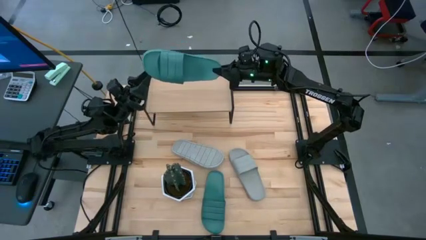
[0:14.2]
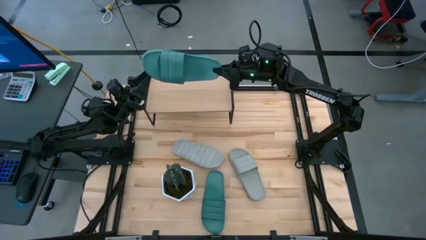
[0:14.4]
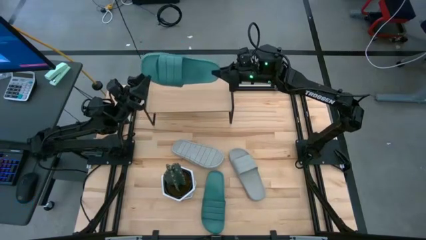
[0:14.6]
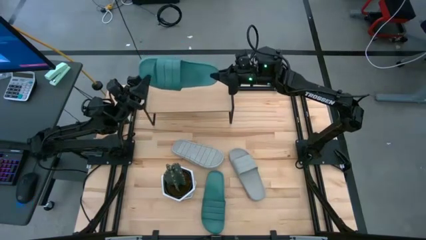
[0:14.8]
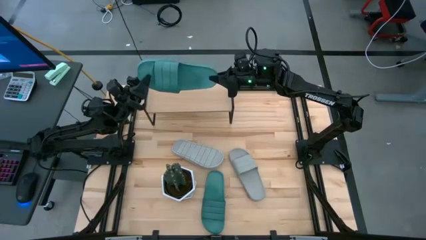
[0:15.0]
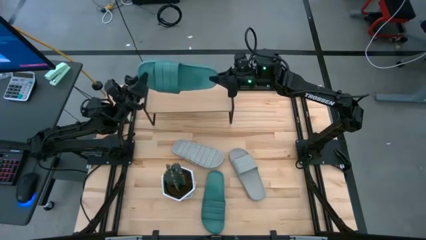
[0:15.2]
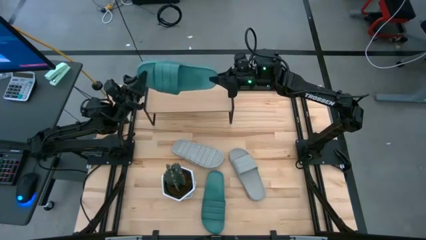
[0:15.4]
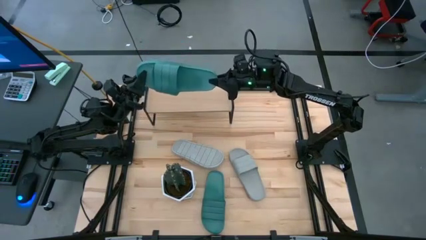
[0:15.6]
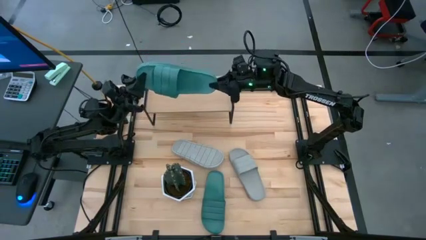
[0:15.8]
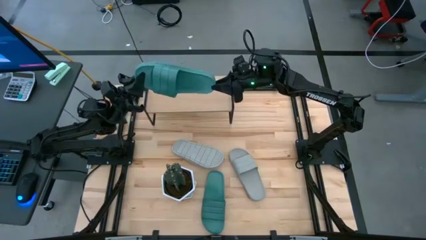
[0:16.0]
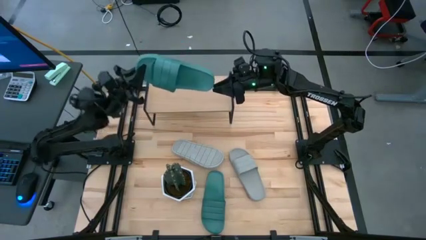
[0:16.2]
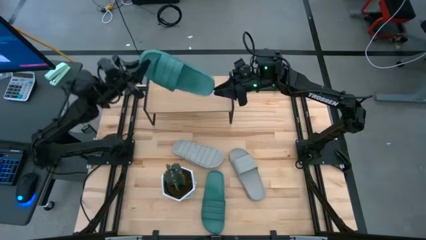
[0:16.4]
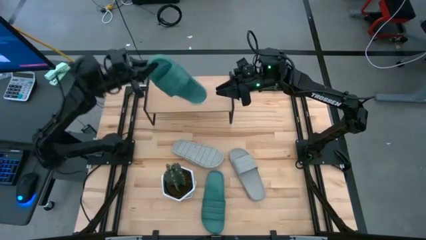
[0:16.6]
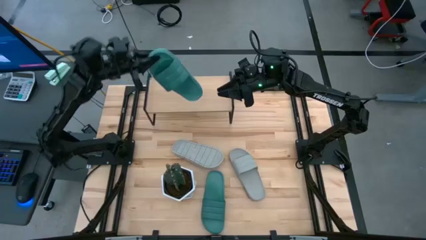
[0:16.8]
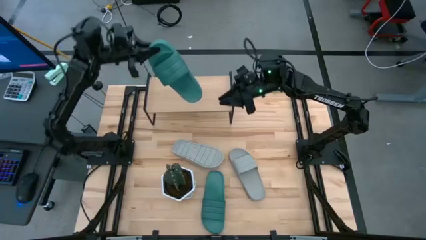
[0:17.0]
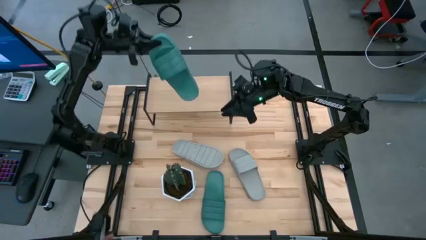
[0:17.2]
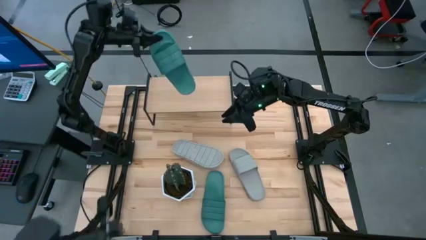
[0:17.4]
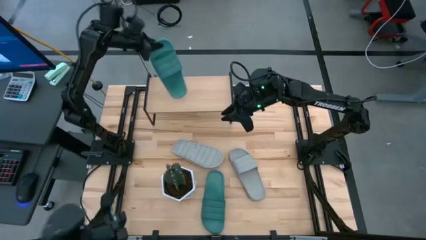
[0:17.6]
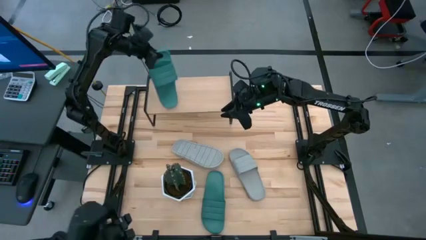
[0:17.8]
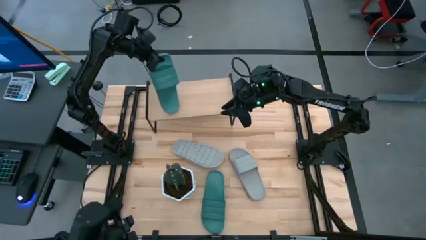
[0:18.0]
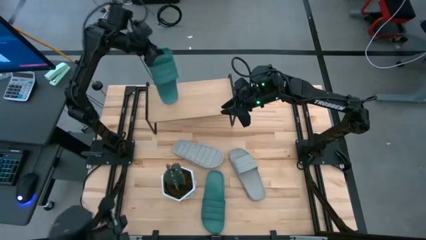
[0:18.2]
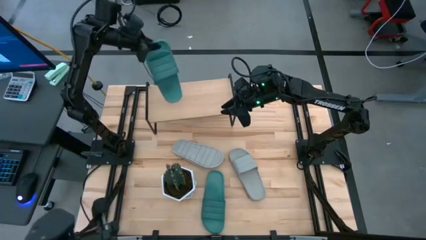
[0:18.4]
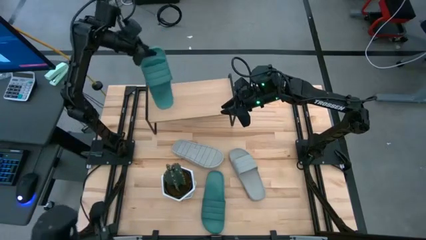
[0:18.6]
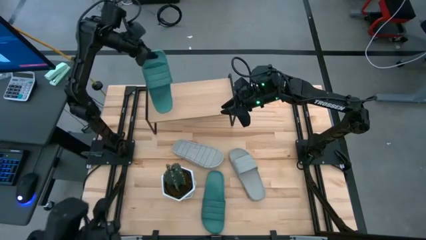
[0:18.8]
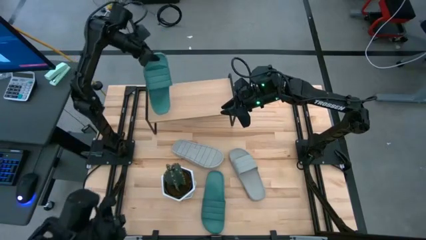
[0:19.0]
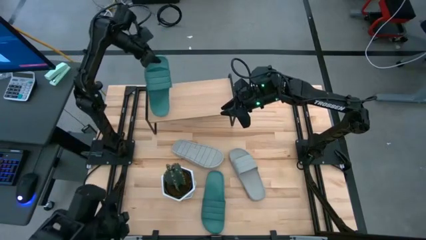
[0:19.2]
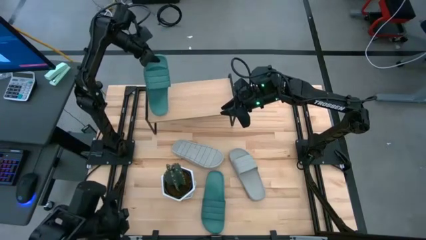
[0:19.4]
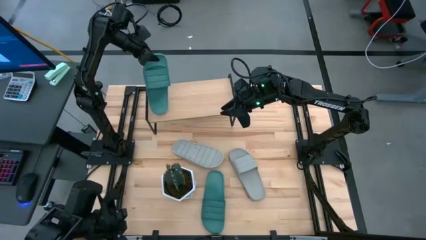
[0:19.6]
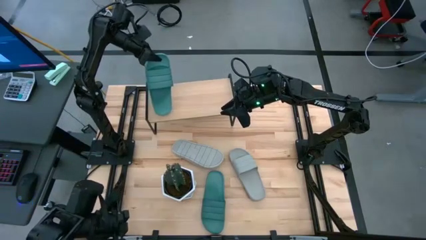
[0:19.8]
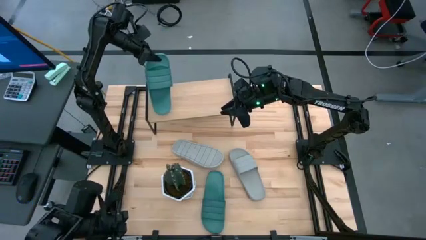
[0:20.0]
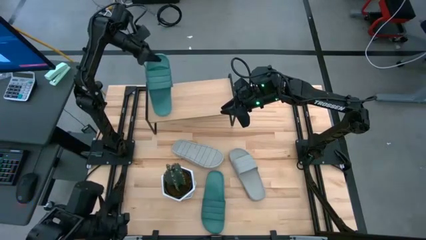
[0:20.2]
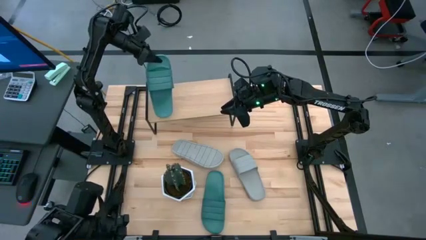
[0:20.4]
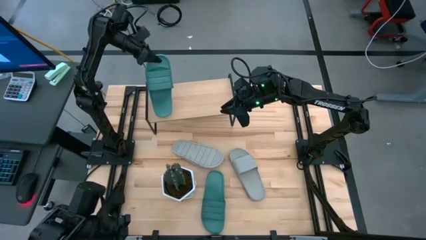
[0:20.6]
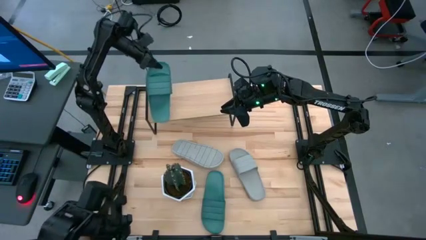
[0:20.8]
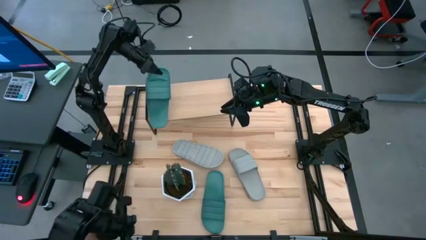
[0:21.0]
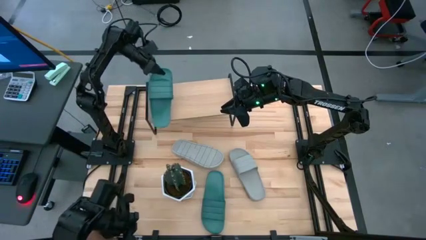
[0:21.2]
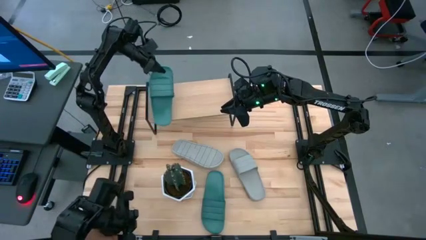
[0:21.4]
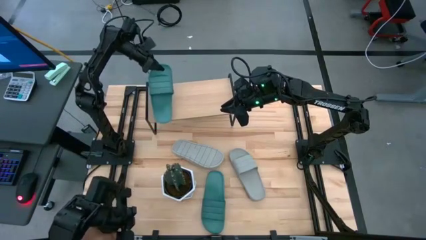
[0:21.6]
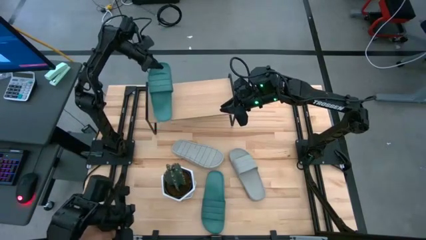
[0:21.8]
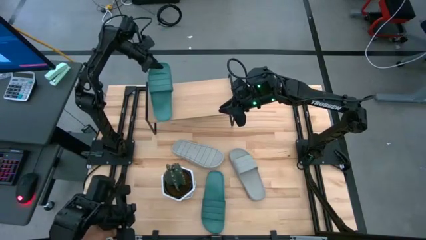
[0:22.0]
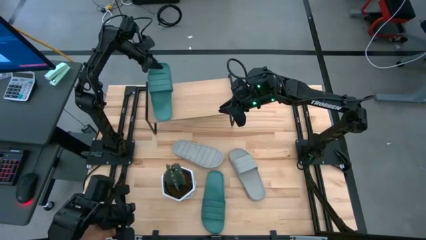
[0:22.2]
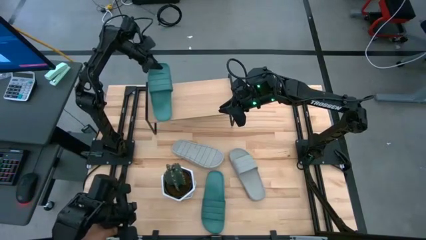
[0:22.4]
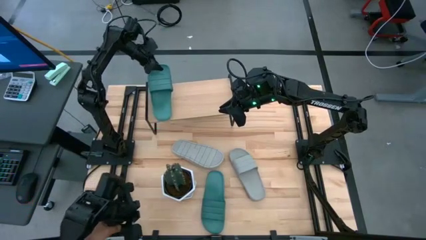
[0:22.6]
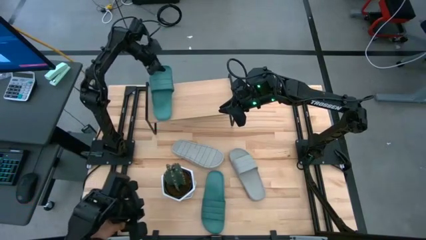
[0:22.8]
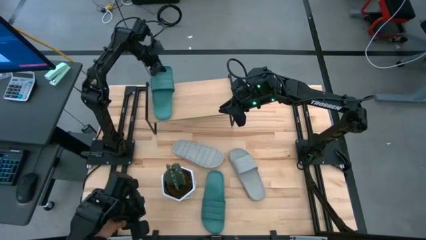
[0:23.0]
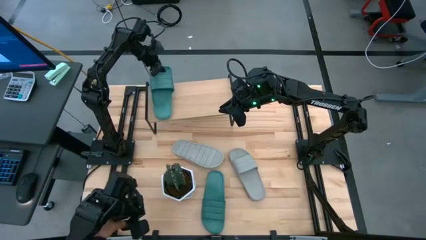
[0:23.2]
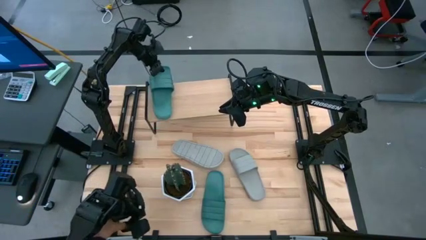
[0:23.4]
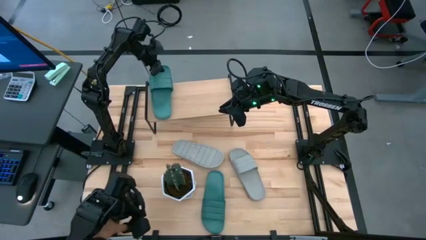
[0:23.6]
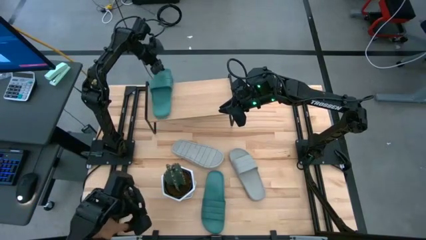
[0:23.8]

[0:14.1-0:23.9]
Task: Pick and place slides into the shelf
Put the top green slipper on the shelf
